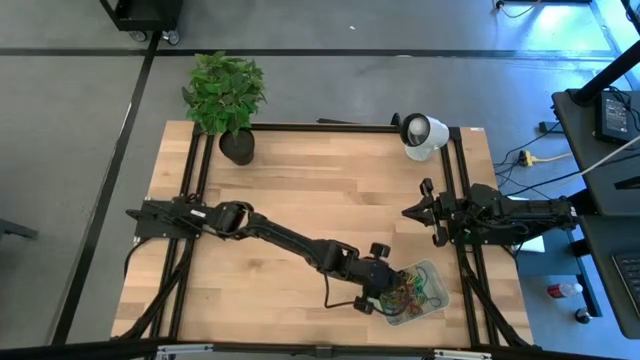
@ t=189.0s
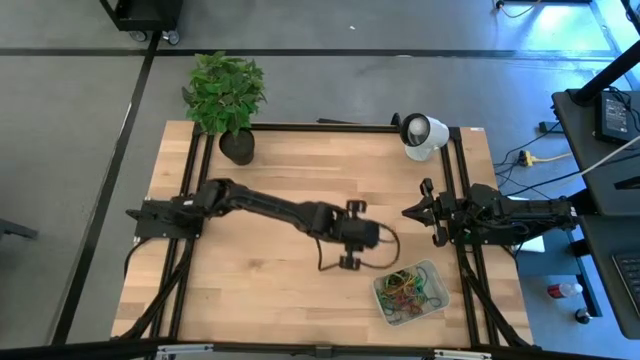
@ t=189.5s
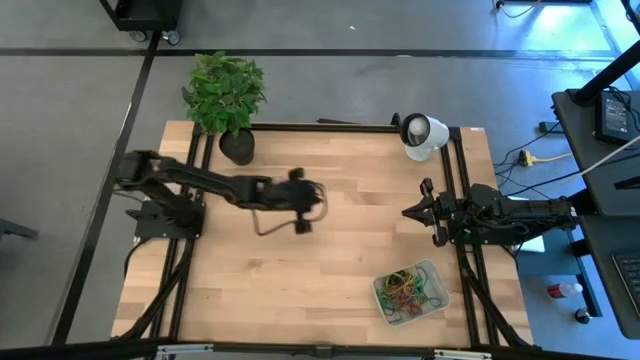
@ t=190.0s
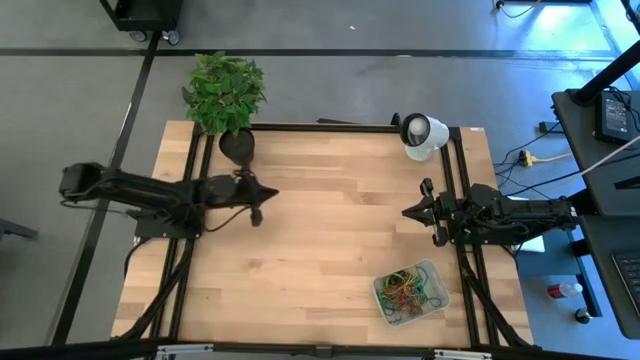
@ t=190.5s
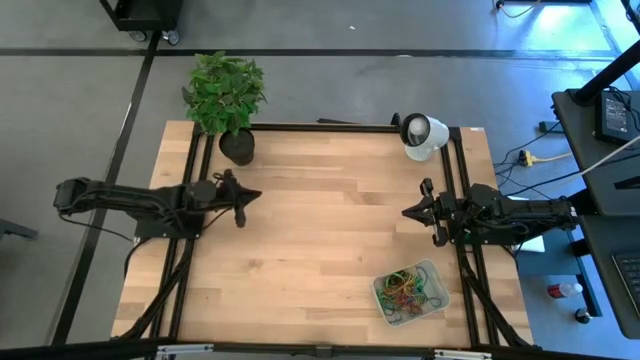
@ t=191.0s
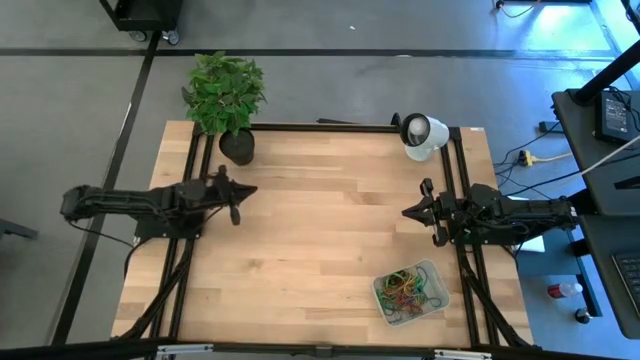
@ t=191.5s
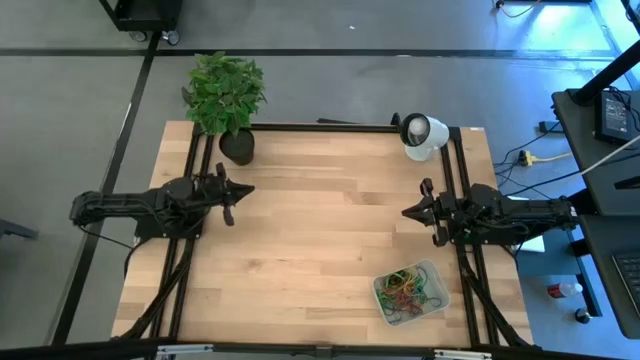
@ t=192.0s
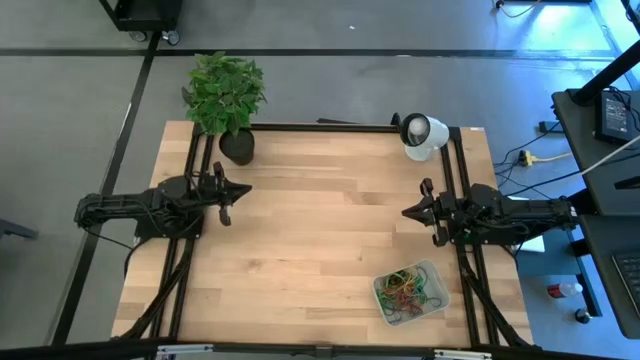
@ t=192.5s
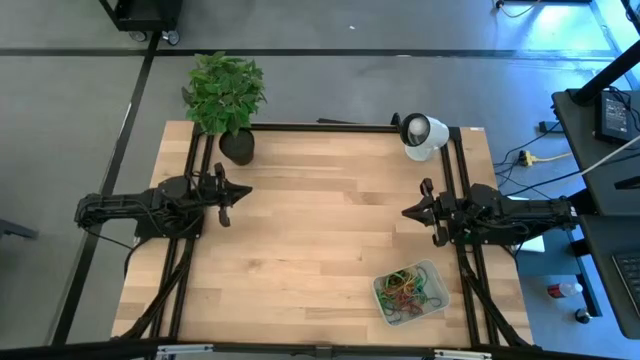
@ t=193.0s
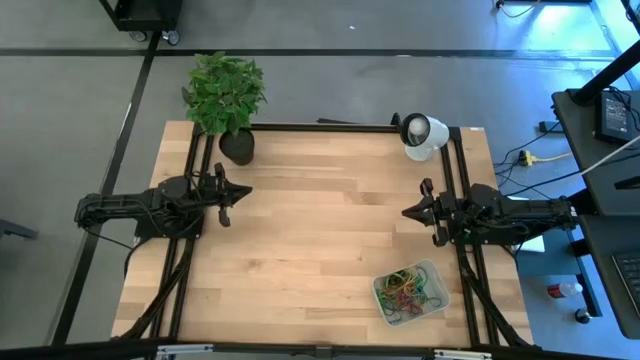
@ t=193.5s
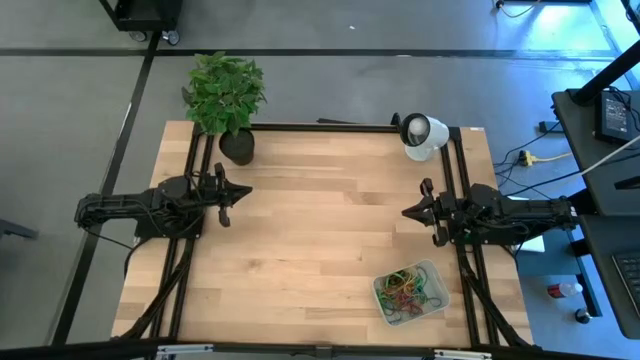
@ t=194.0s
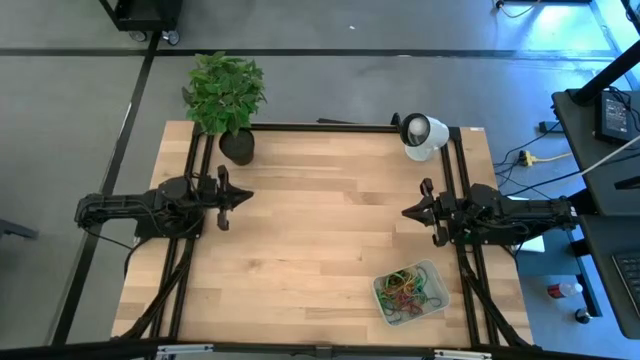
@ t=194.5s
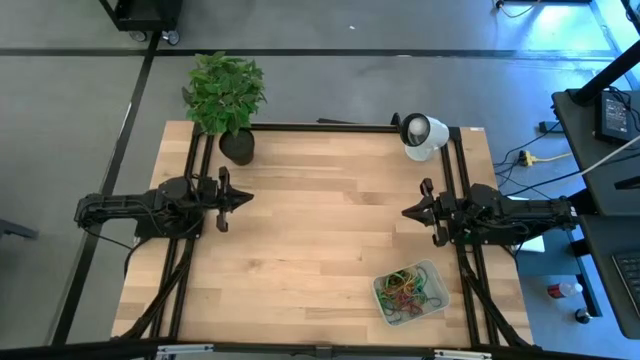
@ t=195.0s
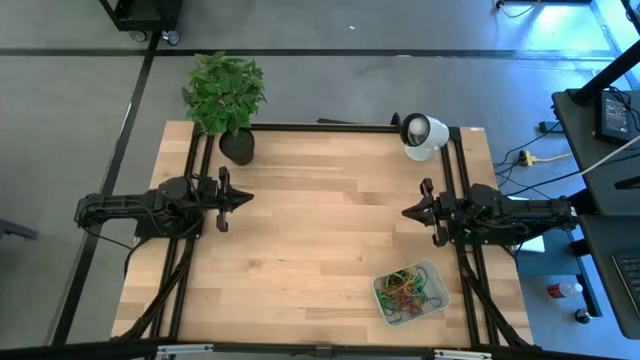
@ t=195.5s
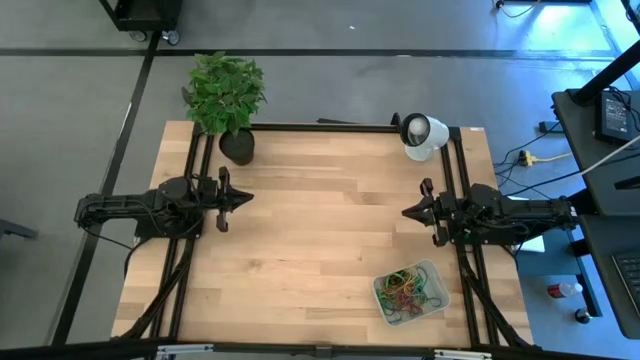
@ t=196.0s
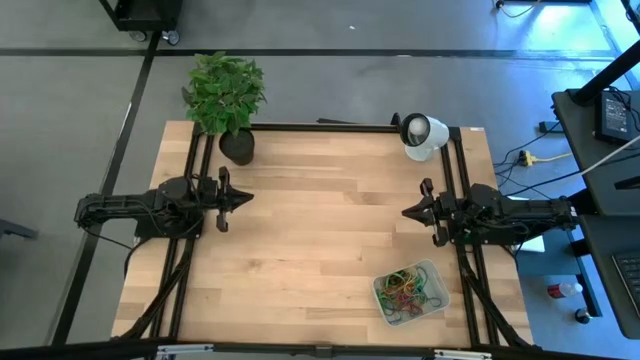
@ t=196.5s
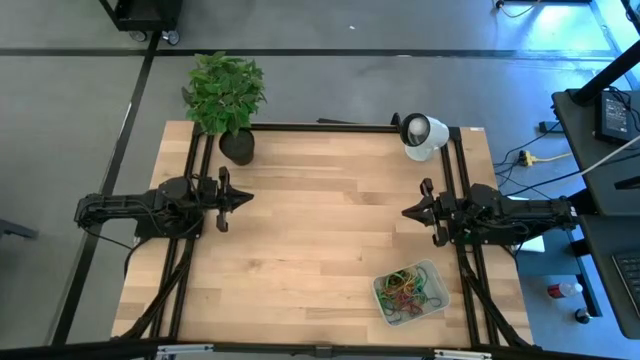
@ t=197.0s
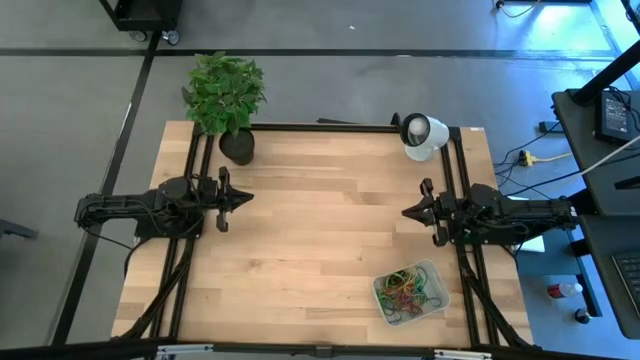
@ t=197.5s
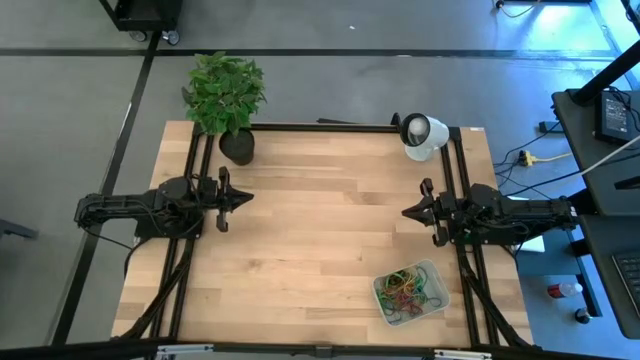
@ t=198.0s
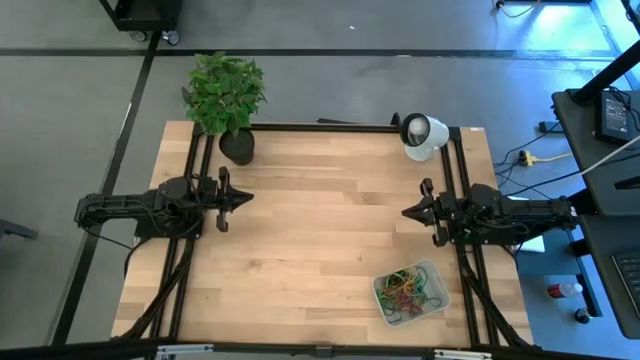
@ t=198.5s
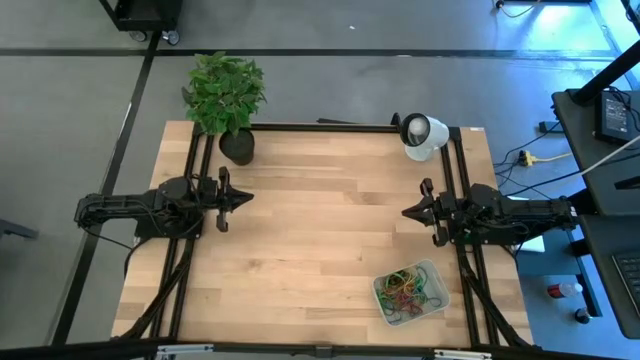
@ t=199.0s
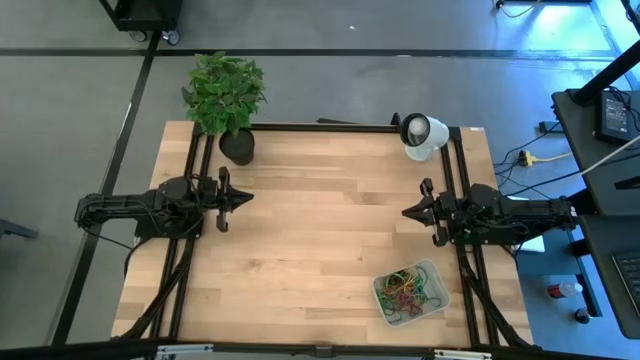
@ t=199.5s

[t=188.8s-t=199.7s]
Task: Pick and place rubber bands into bin
Return to Home Position

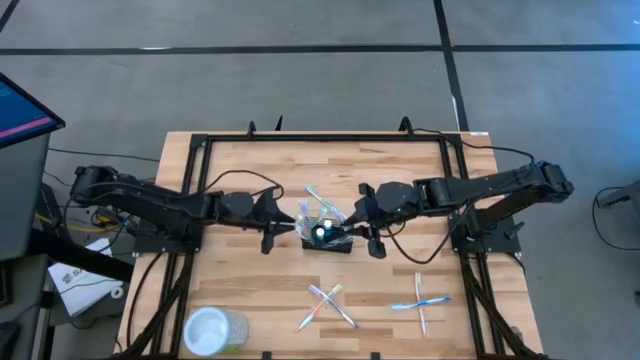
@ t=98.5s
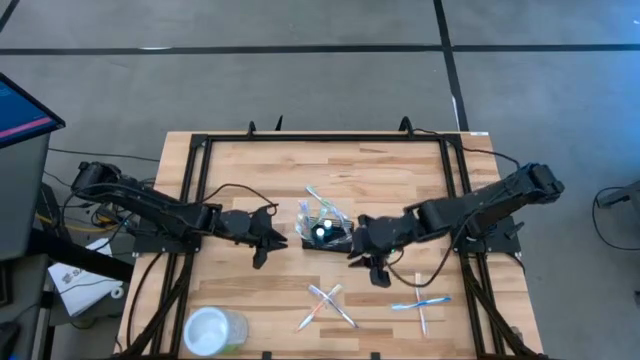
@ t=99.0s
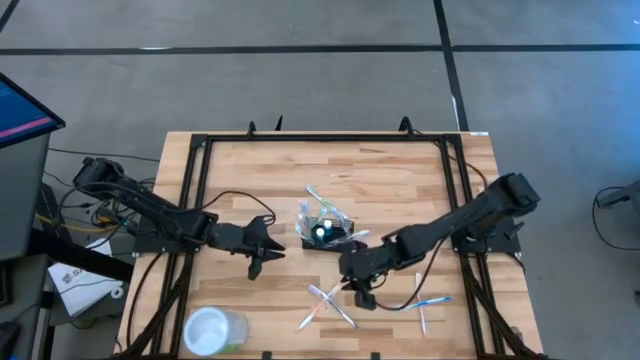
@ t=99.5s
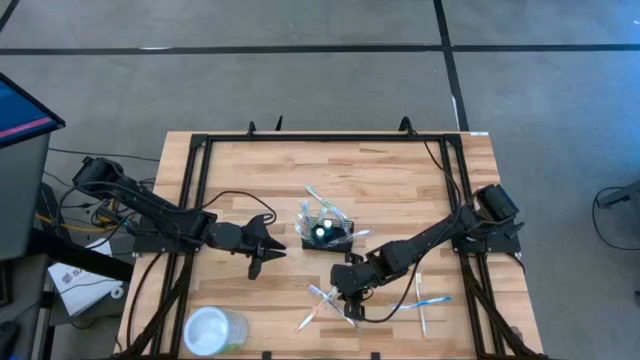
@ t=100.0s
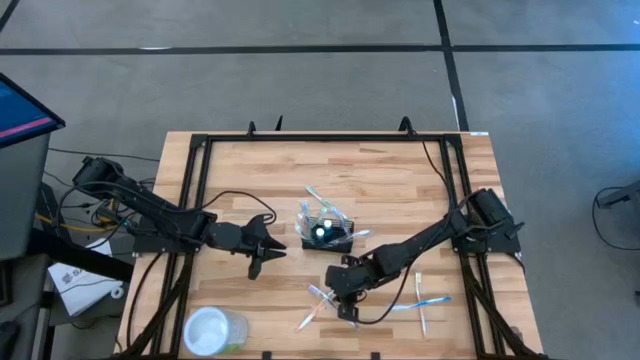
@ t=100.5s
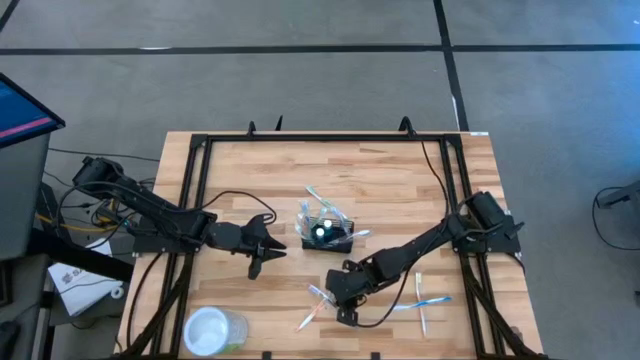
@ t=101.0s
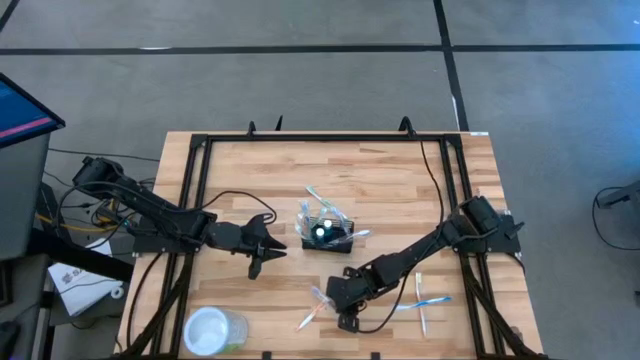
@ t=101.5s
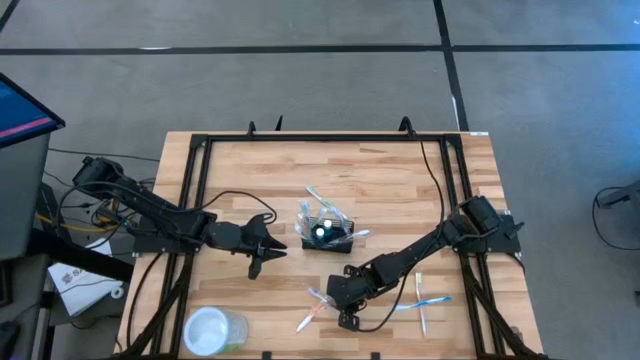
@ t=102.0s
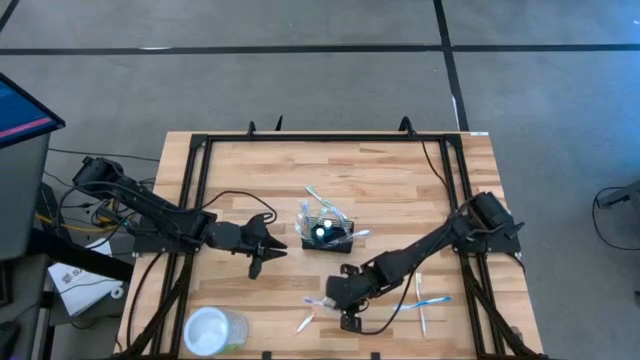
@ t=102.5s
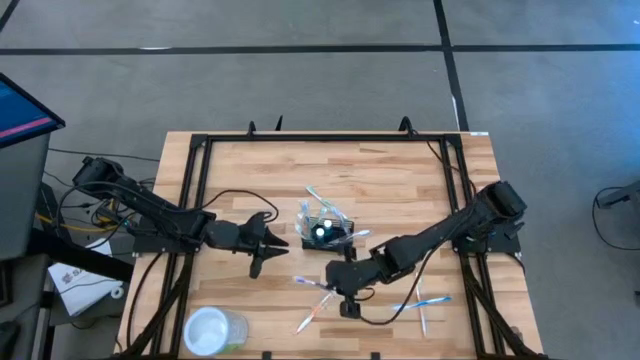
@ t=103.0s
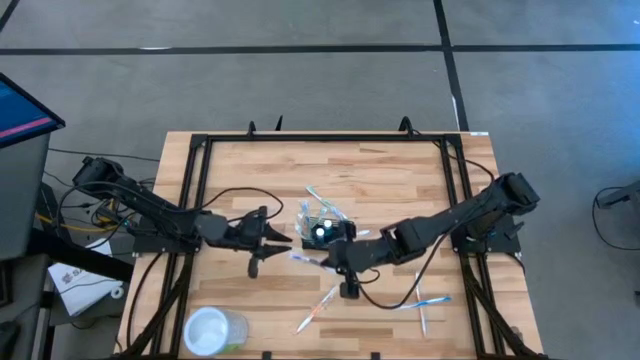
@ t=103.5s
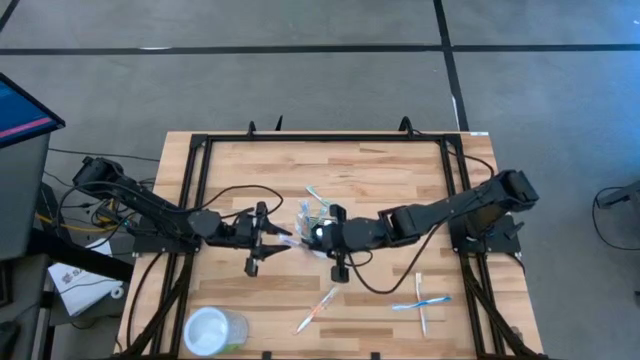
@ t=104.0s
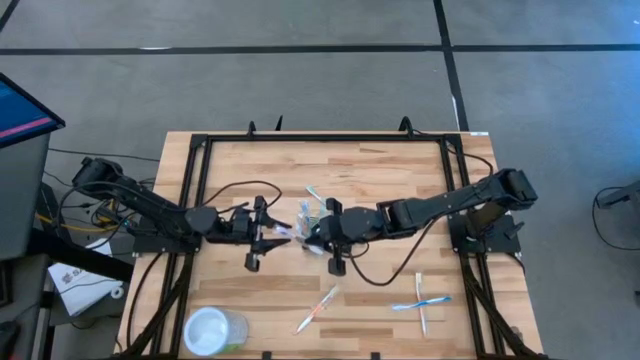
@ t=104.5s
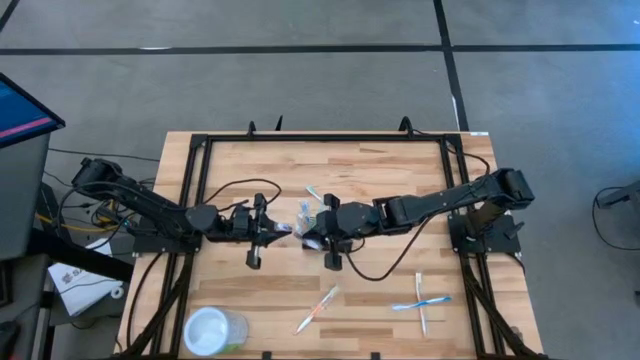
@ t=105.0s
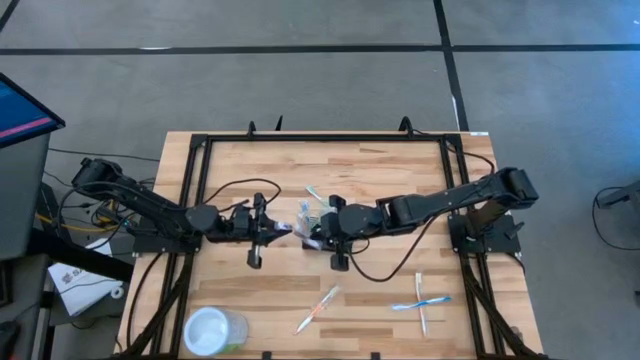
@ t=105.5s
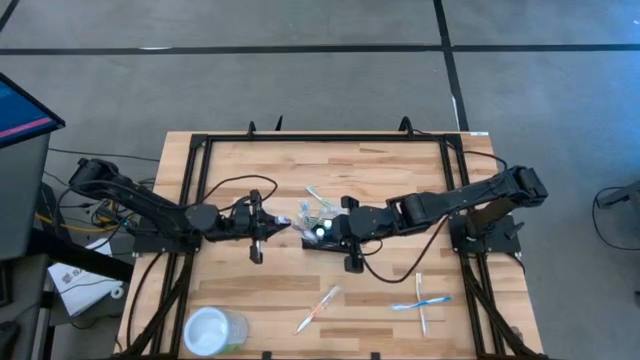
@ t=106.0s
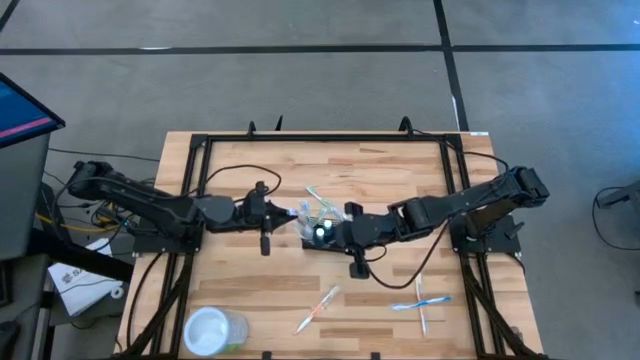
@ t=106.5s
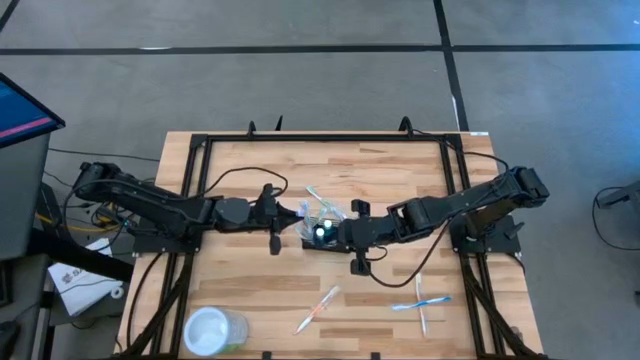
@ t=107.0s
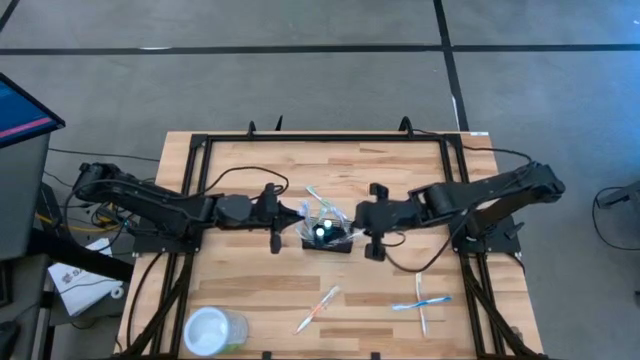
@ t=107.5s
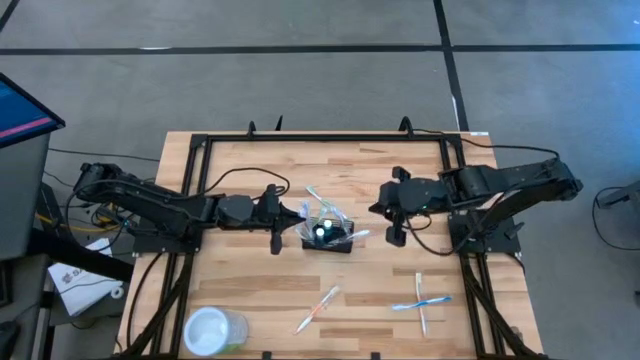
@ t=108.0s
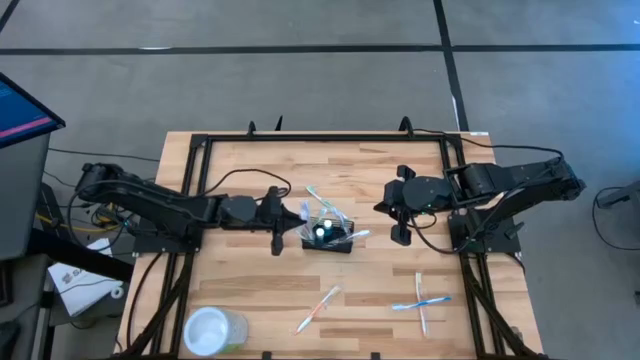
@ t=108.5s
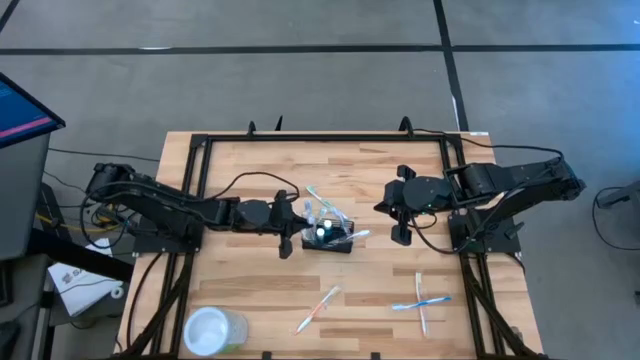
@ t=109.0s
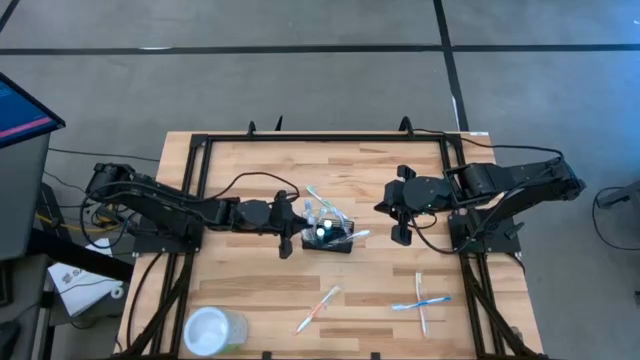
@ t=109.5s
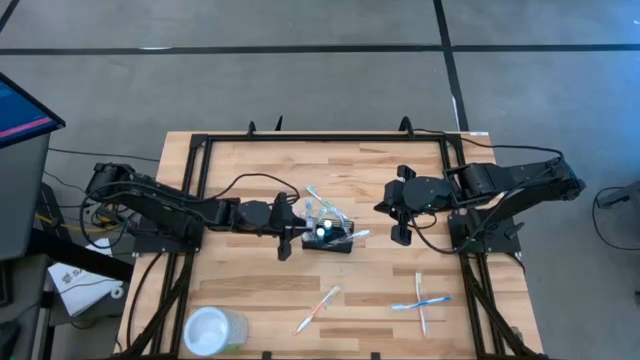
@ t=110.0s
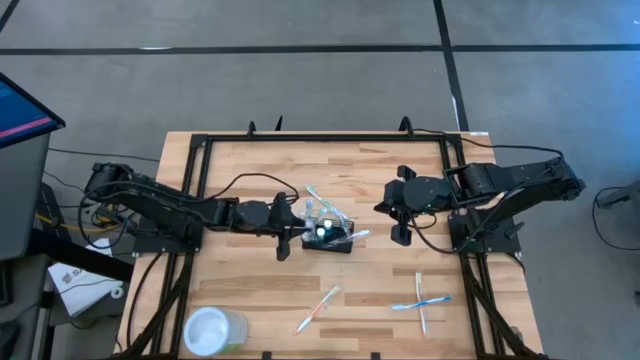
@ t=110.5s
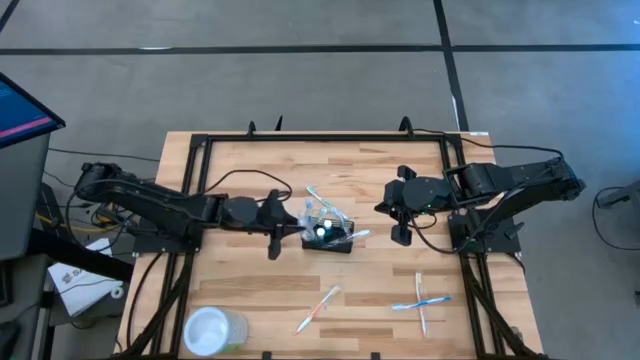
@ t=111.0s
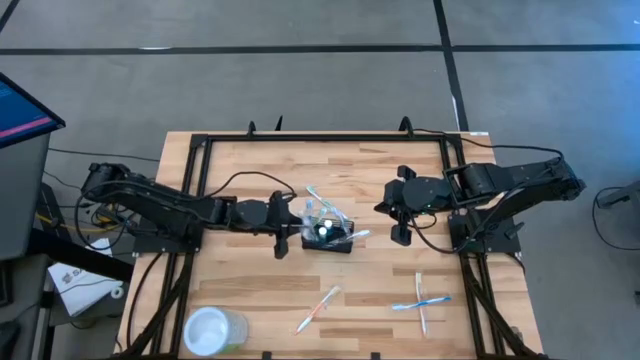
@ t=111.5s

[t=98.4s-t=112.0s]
Task: Pick & Place toothbrushing station
Put the purple toothbrush into the wire organizer
